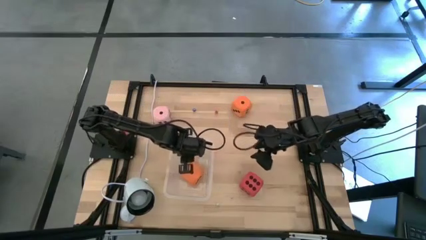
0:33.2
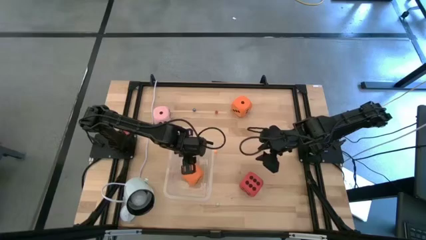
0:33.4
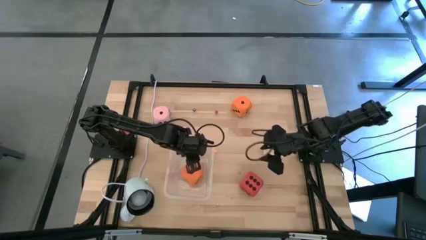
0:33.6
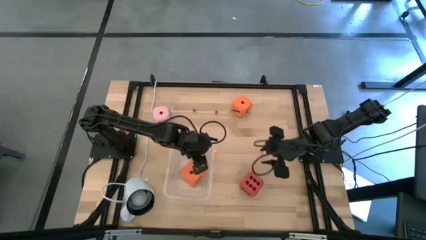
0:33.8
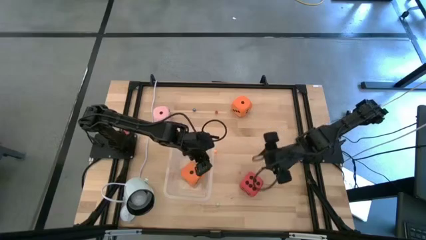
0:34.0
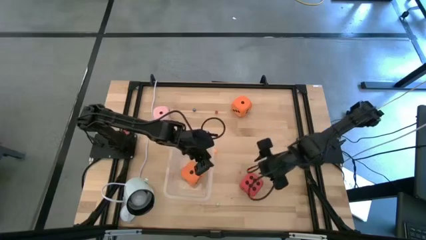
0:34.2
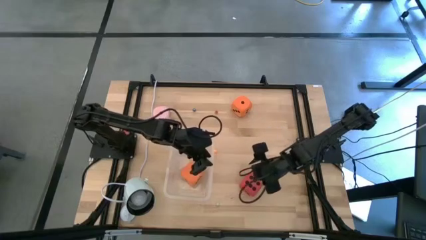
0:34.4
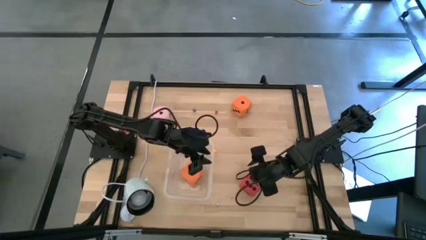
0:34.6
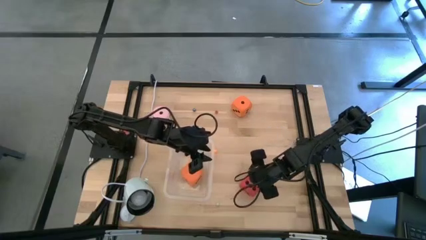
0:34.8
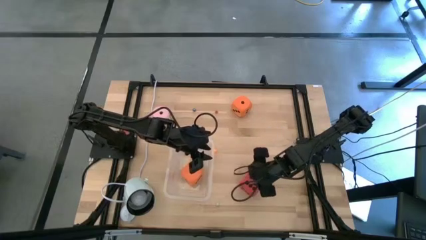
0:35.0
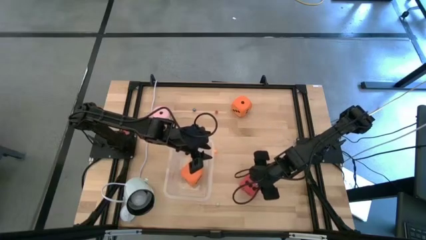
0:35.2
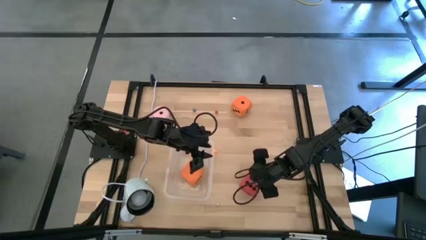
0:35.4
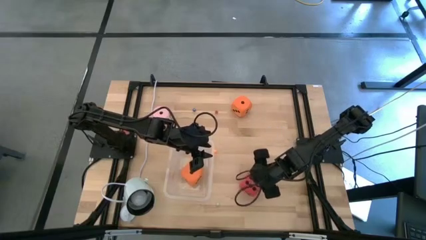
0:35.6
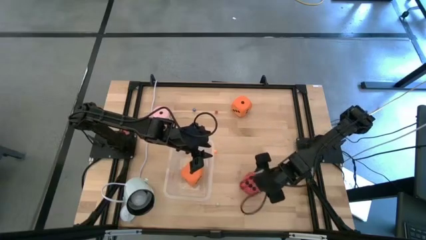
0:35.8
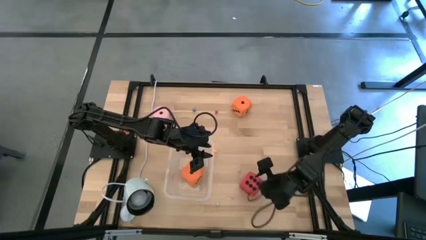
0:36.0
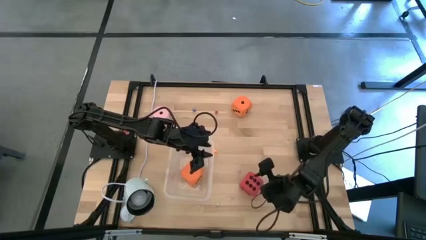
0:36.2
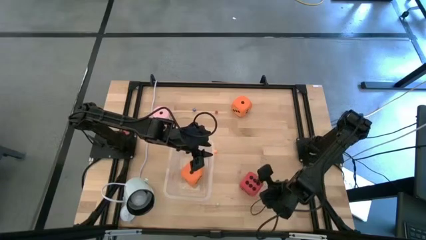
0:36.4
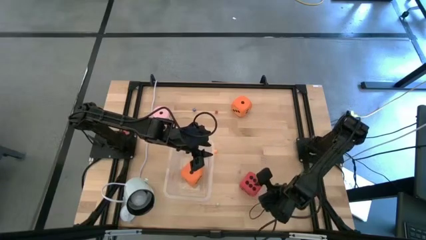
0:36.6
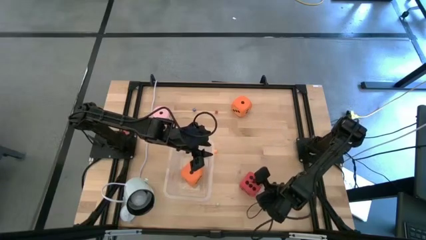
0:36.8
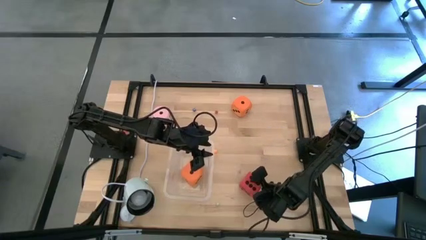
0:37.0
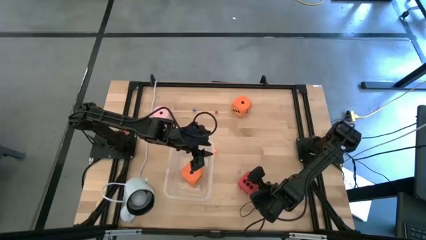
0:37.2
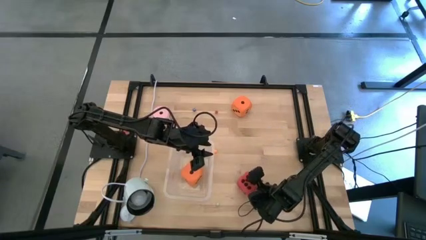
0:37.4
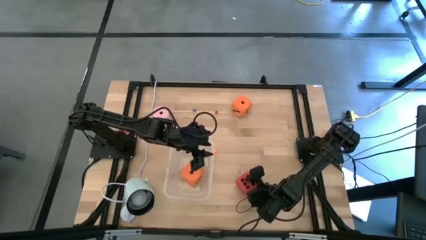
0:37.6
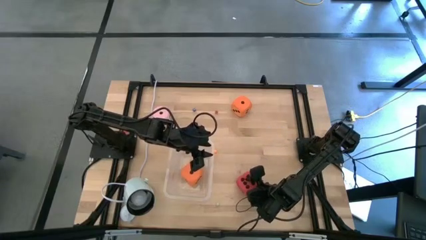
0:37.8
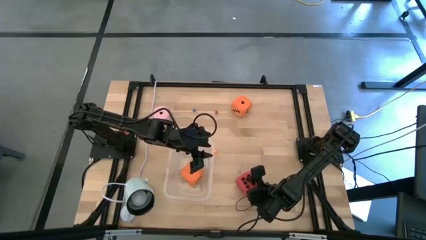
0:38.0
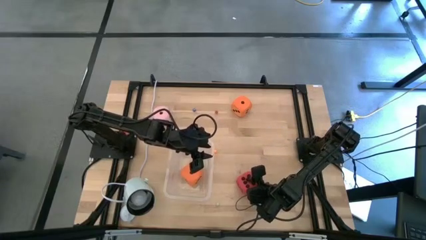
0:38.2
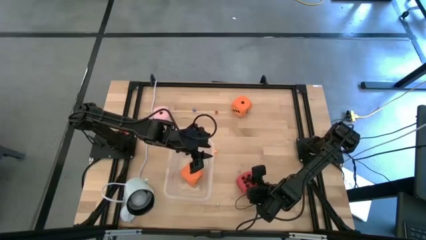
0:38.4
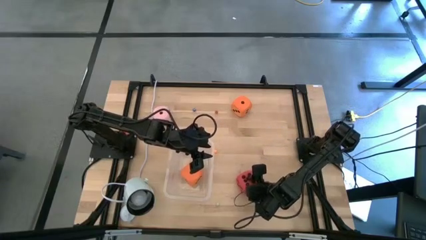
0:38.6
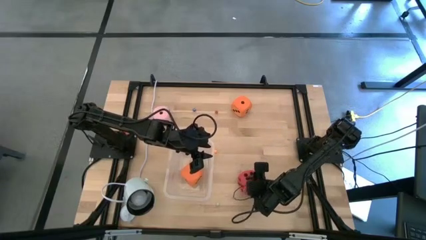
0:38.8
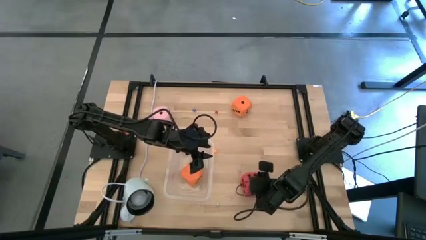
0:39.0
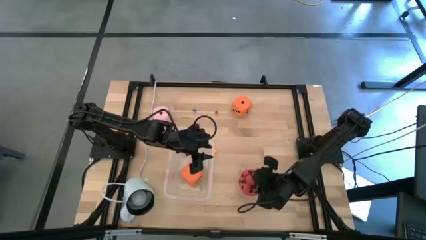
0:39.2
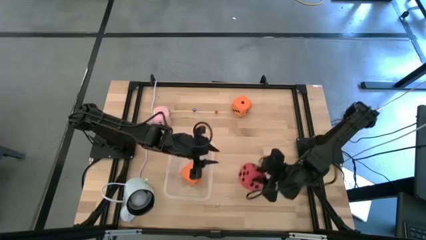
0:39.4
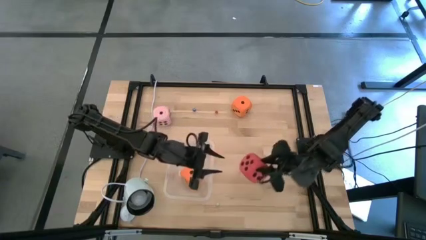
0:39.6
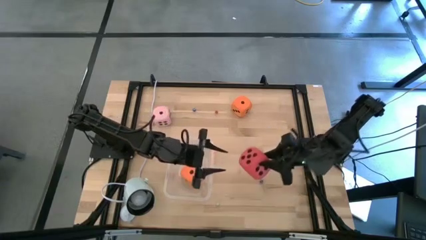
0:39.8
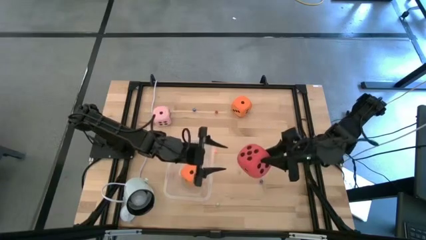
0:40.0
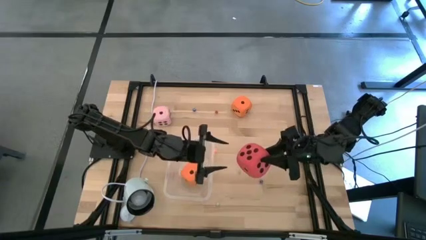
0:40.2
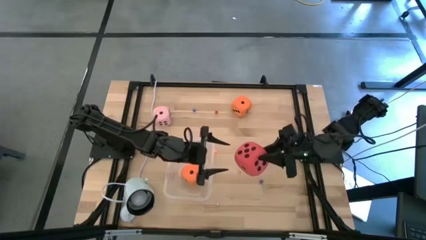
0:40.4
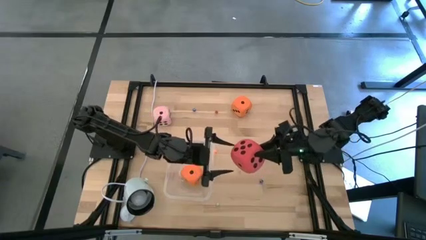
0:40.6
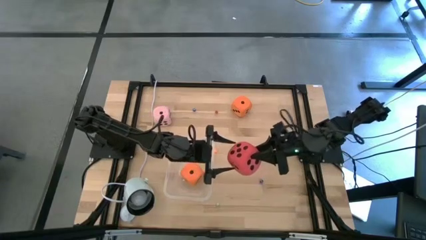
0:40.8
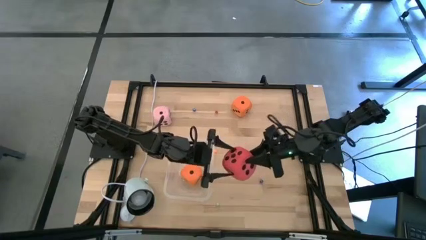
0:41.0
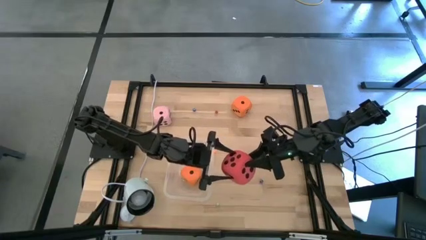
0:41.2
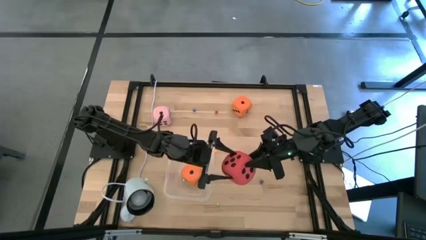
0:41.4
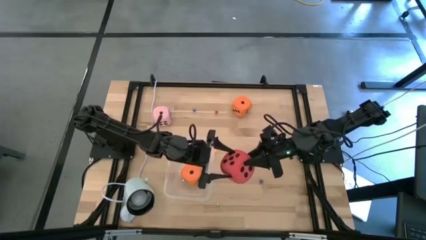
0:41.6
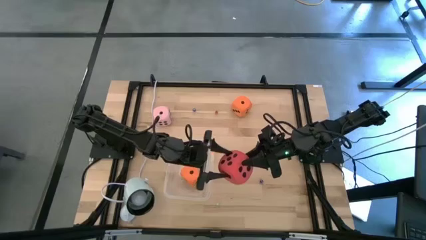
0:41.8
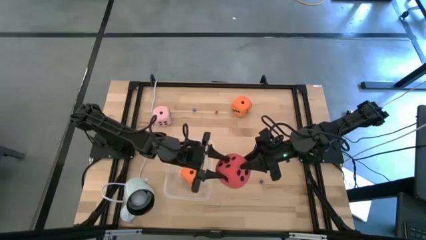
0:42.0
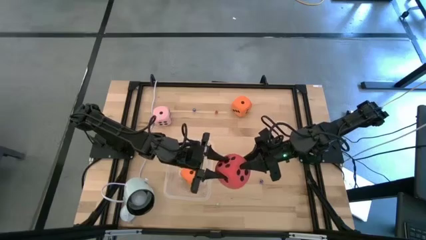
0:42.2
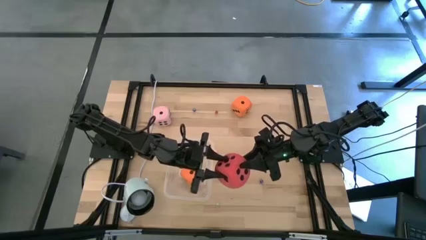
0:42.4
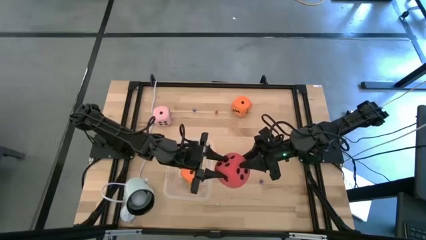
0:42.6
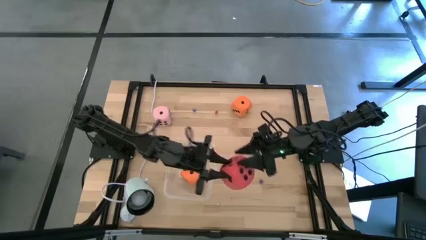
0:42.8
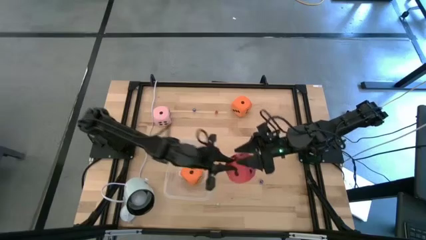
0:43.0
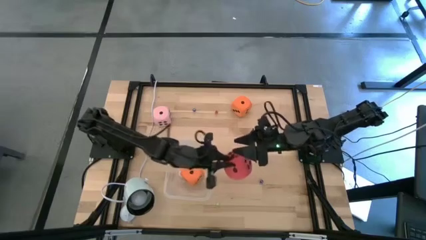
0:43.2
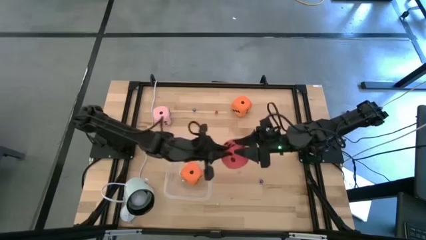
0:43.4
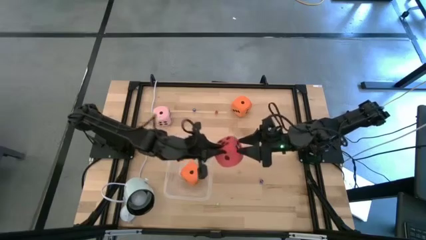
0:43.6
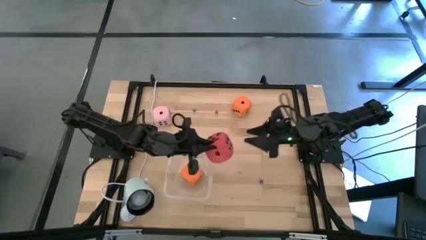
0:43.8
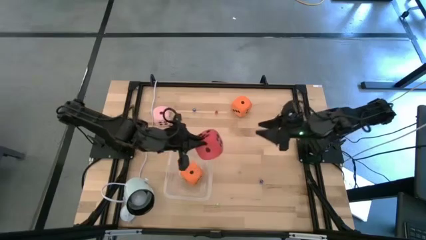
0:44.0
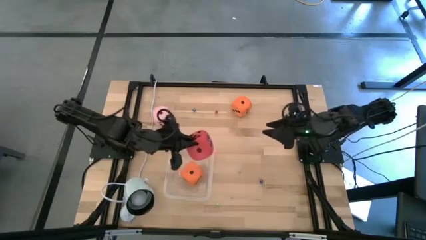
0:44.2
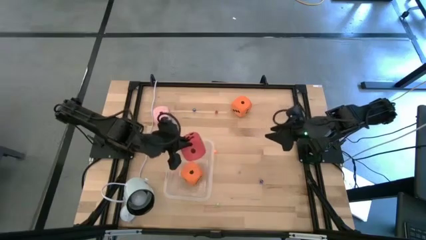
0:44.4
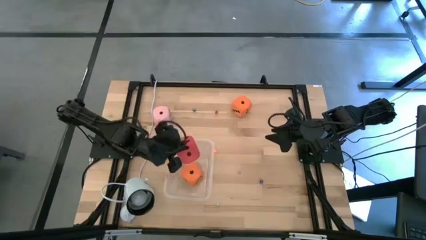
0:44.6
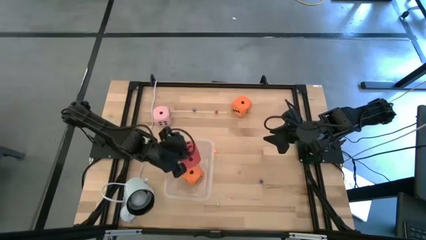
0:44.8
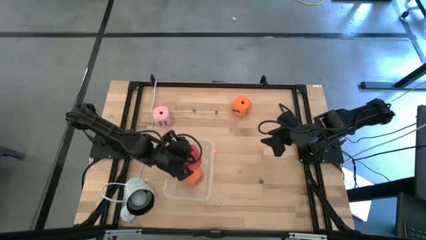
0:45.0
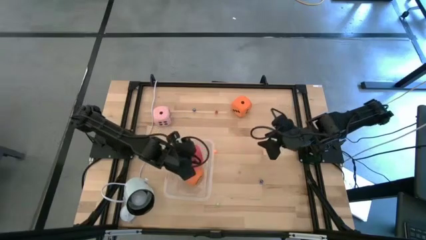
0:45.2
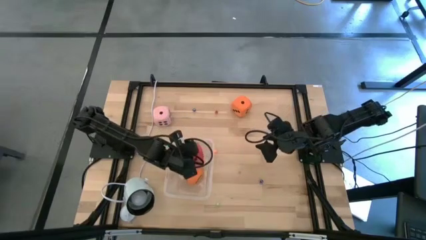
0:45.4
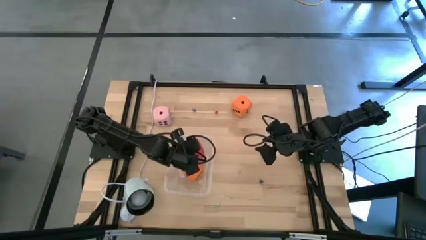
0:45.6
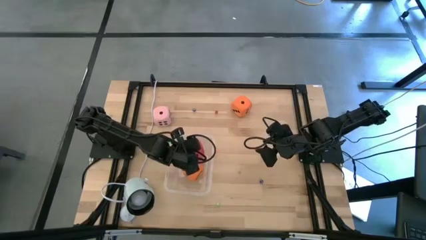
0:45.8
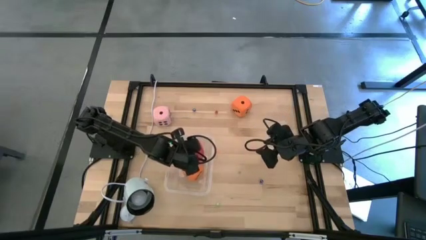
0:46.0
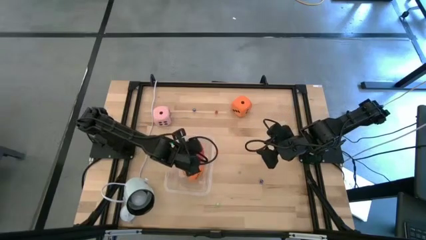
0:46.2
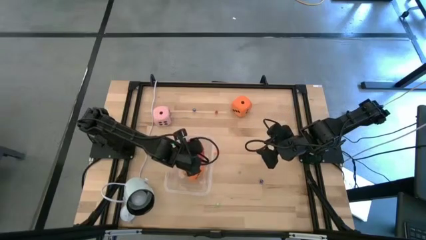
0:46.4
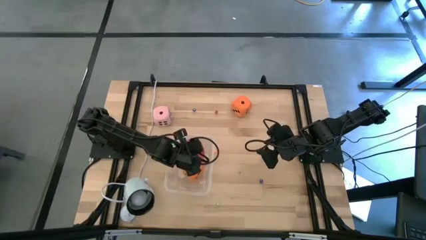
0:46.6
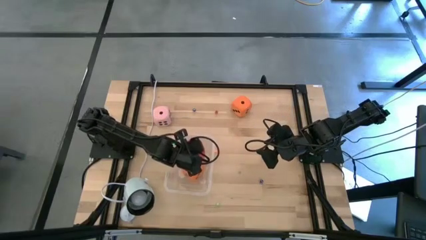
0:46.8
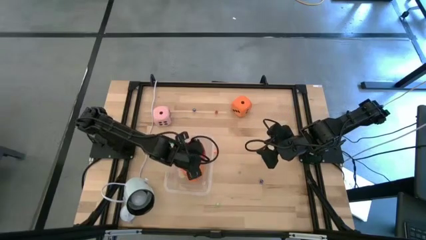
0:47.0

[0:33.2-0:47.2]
Task: Pick & Place Dice
Put the large red die in the bin

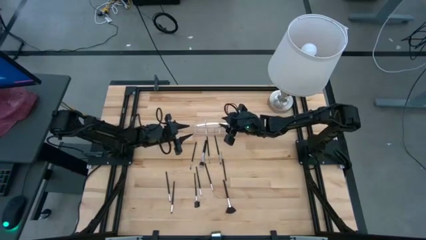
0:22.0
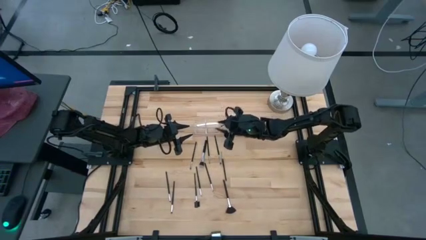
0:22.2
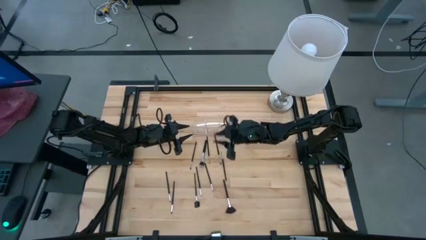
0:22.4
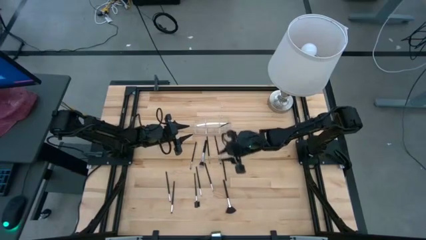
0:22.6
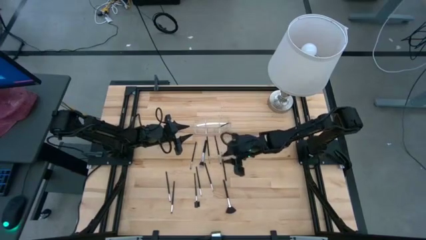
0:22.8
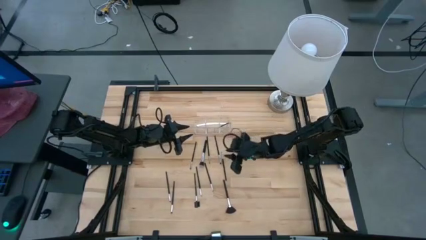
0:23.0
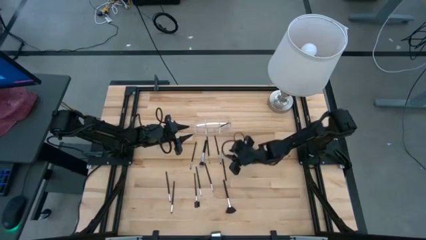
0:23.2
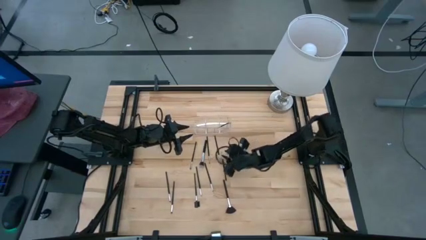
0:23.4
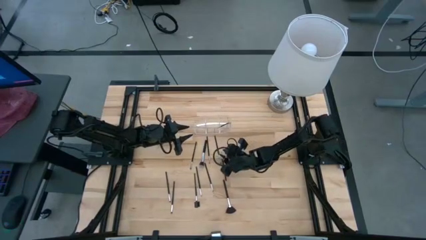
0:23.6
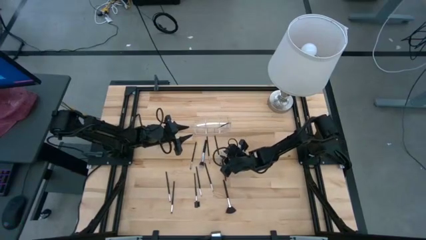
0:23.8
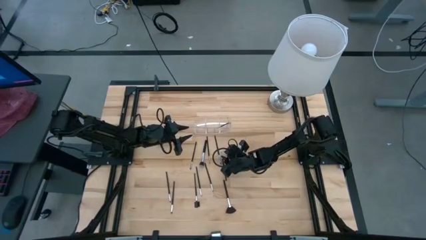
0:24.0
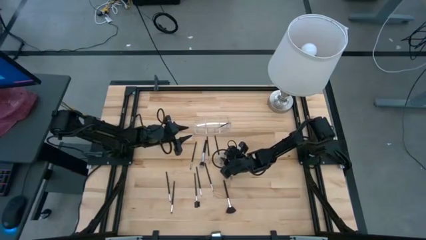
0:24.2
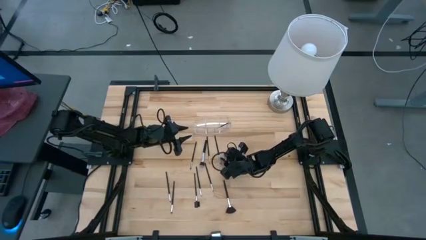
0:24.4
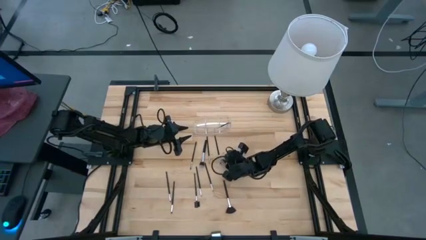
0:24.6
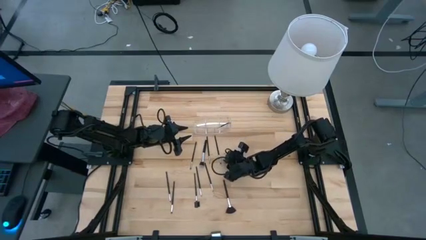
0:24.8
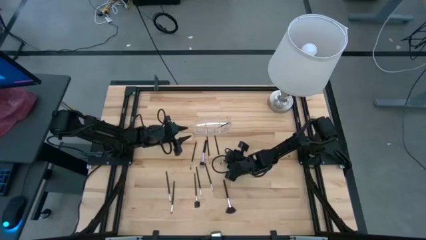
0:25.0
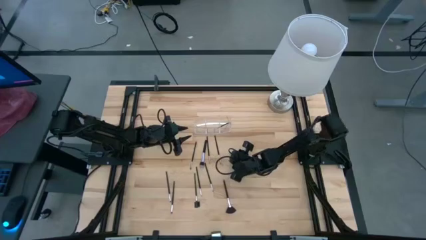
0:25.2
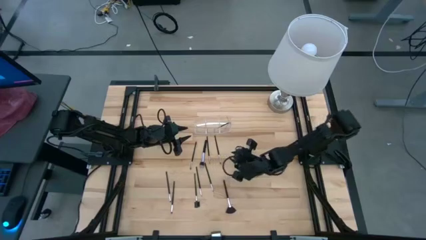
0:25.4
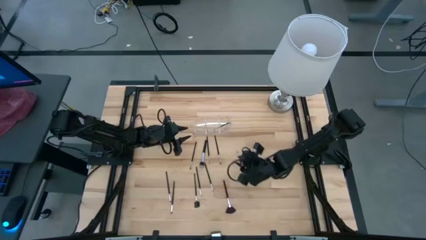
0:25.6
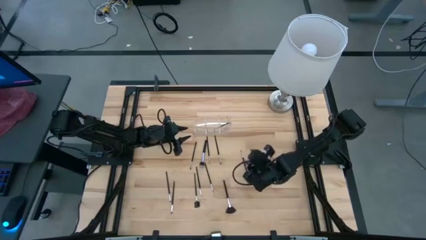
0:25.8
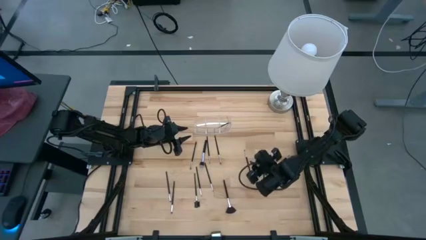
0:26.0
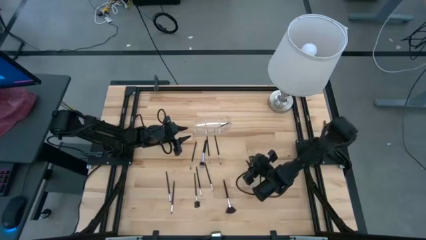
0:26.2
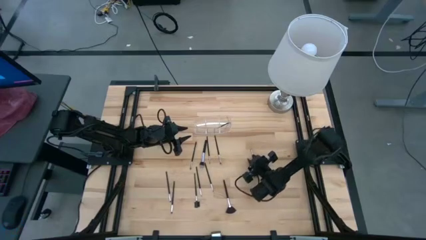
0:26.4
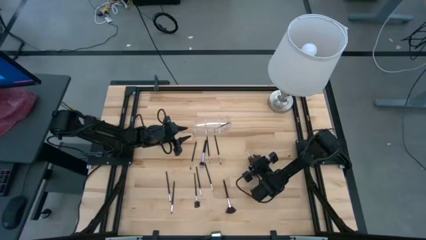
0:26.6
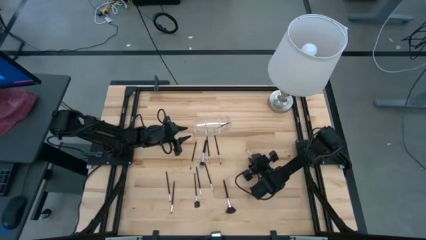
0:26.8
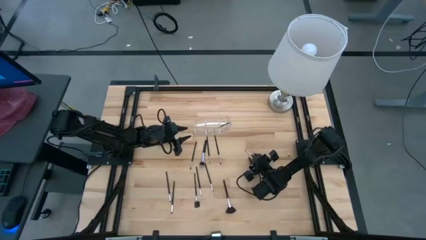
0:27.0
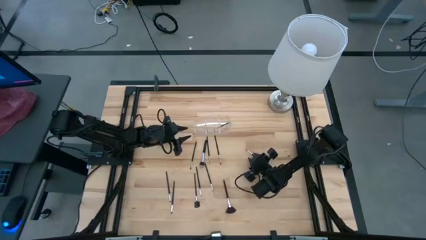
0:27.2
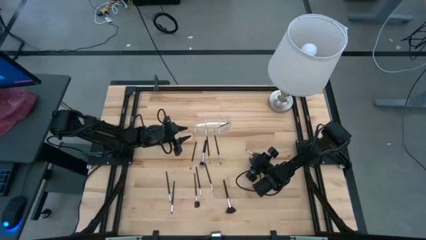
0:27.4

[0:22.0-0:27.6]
Task: Put items in baskets/containers
Put the black eyeshadow brush into the transparent organizer
